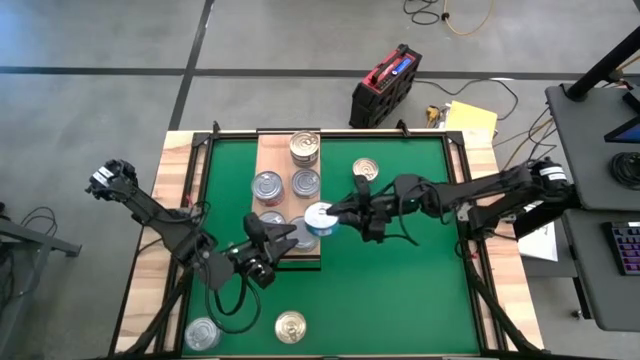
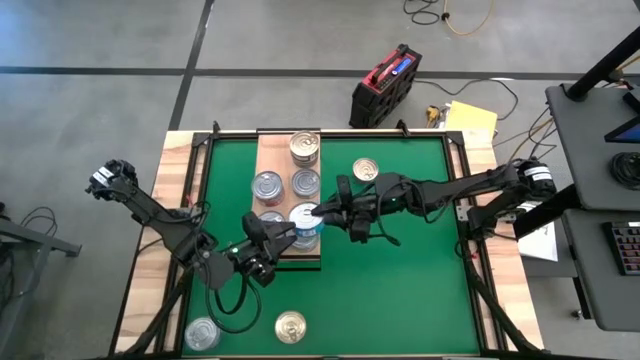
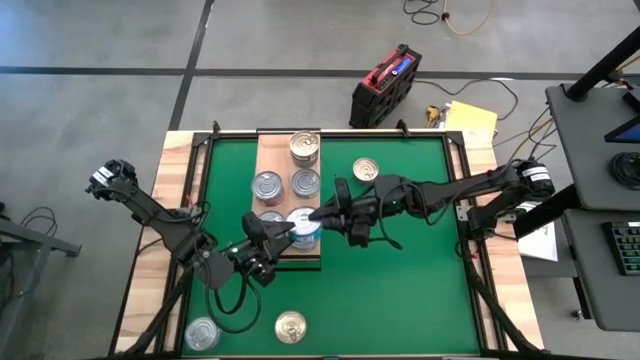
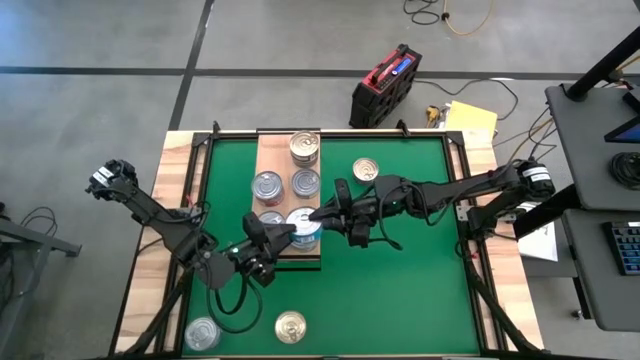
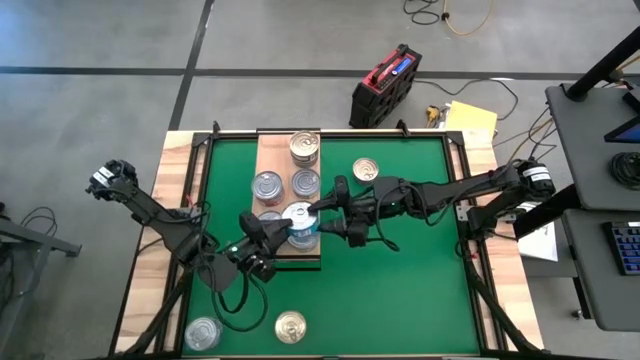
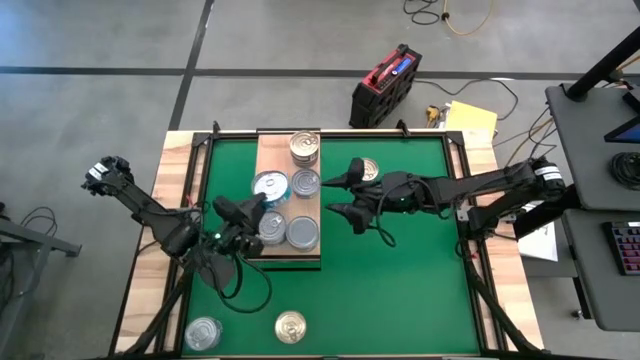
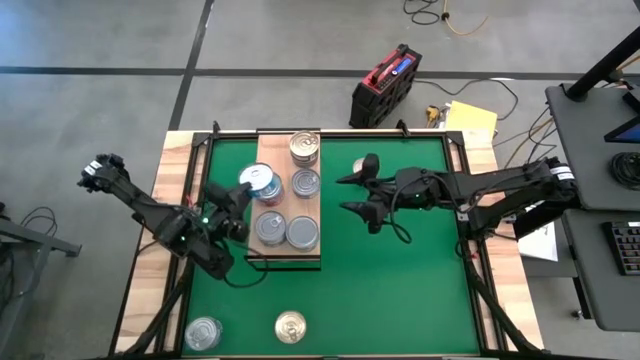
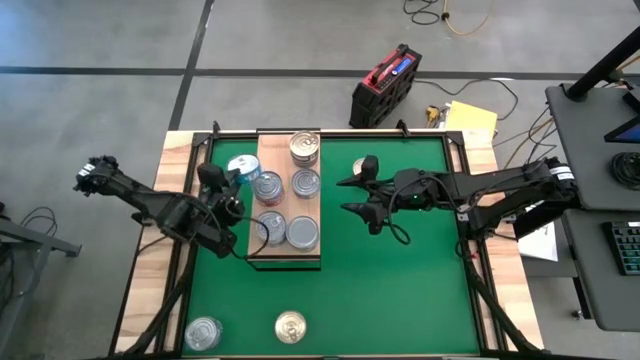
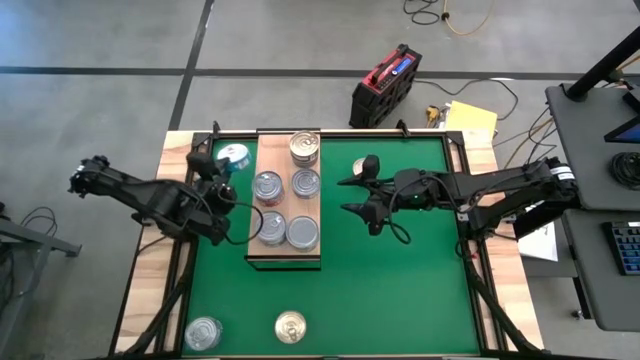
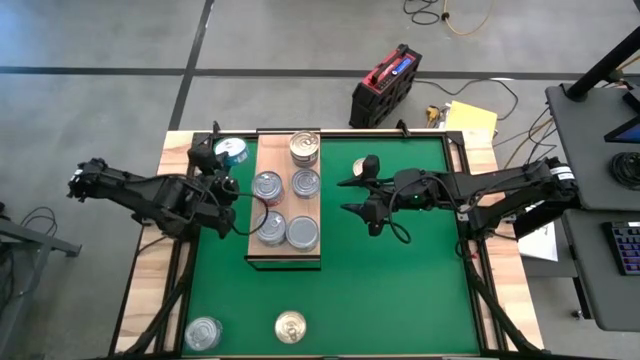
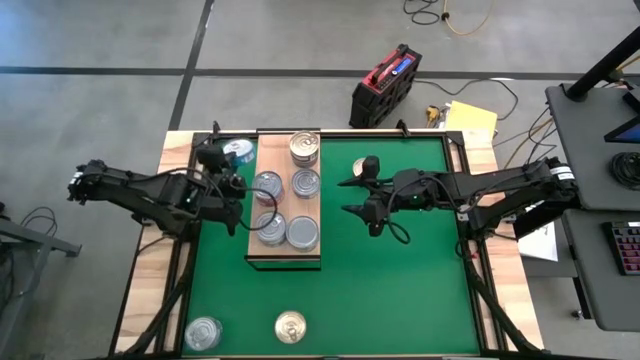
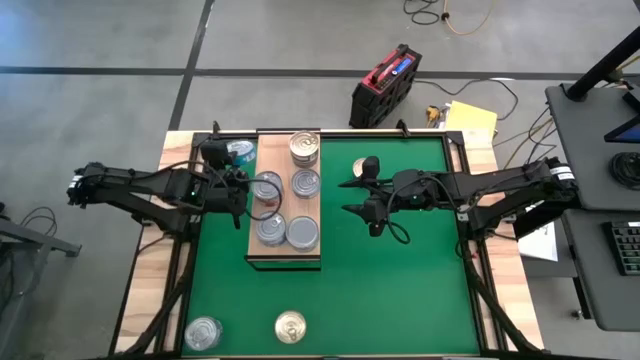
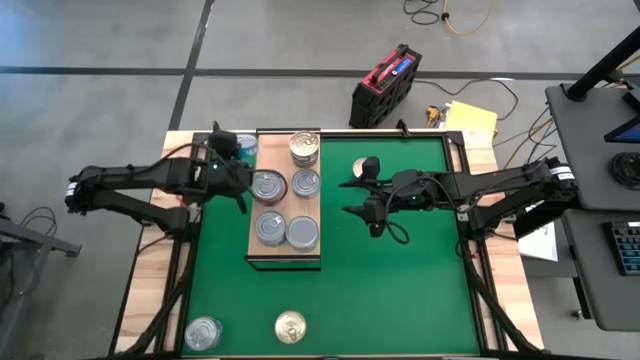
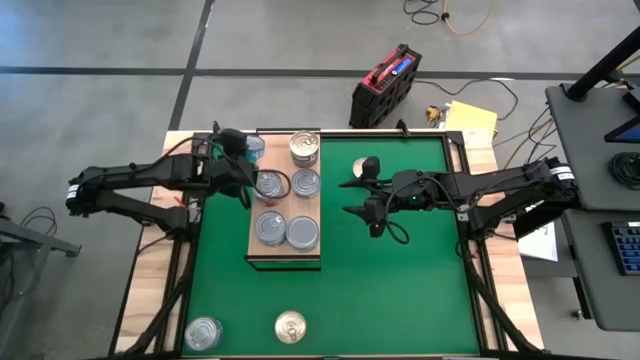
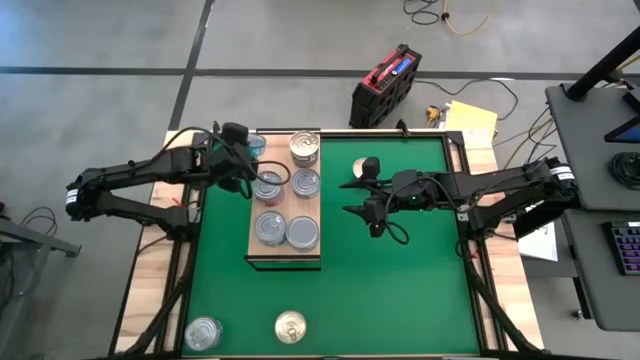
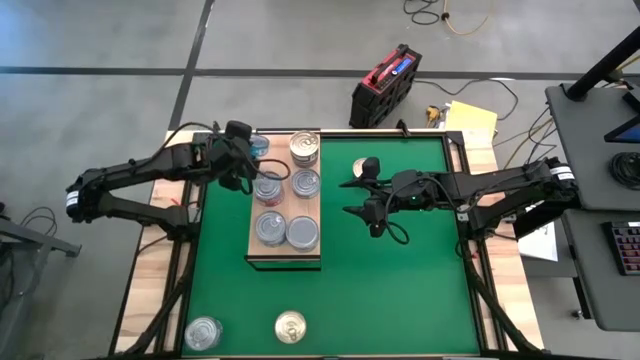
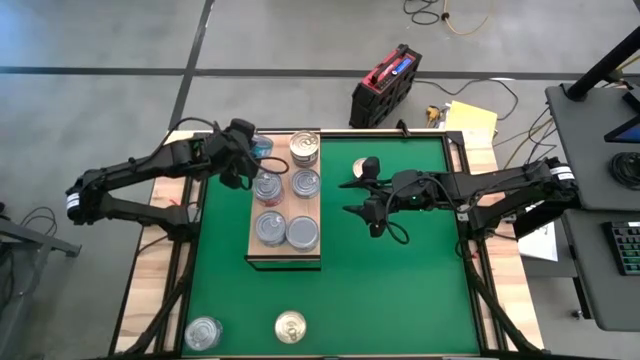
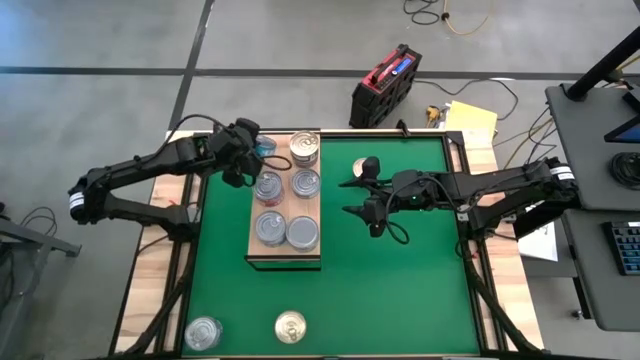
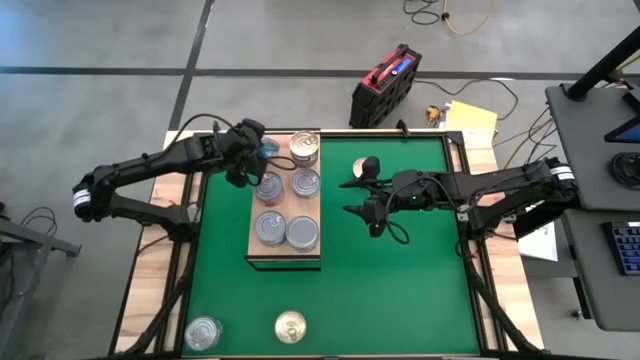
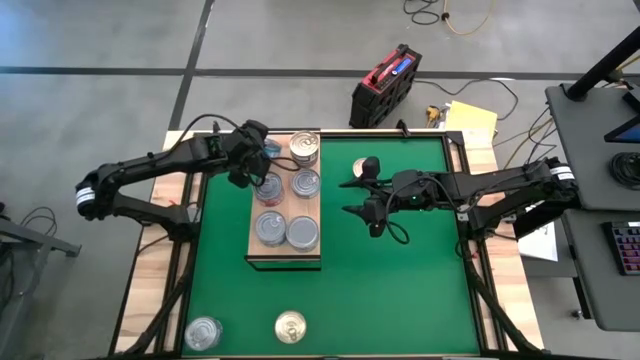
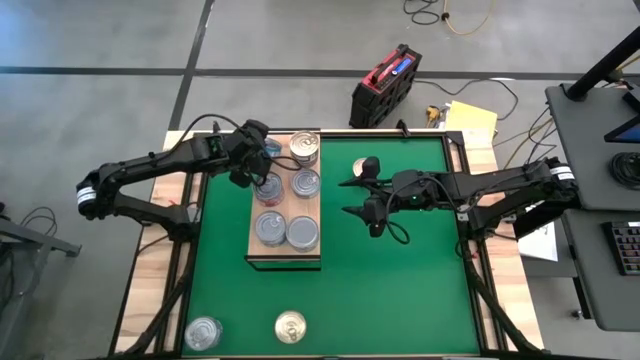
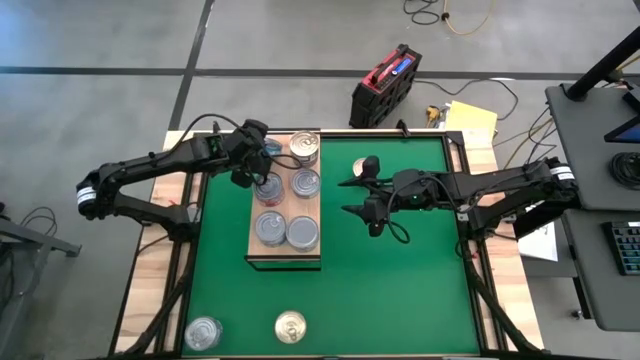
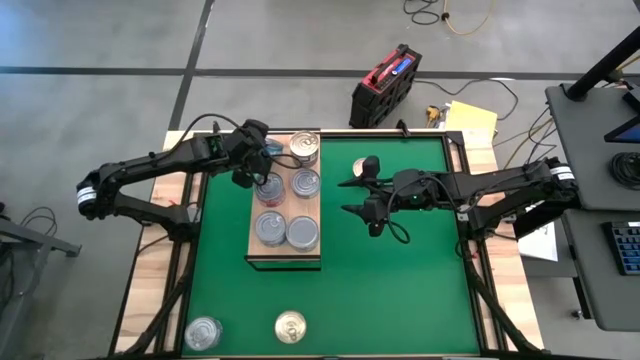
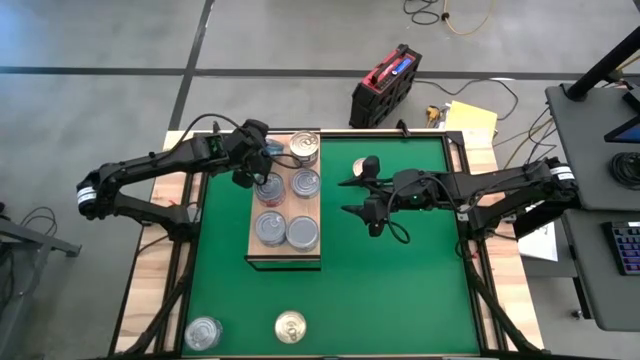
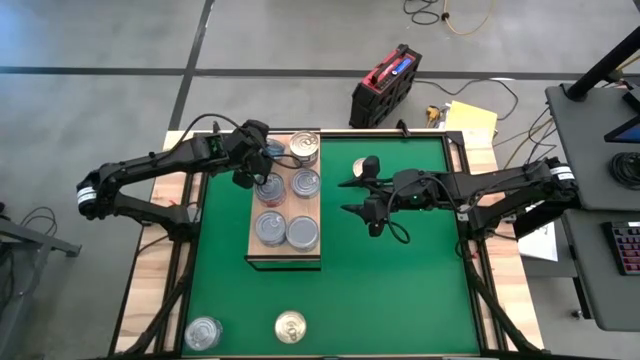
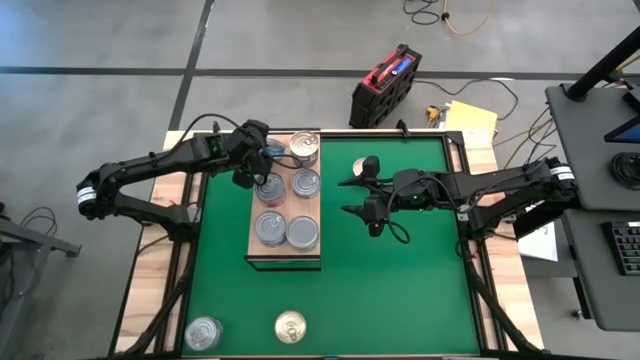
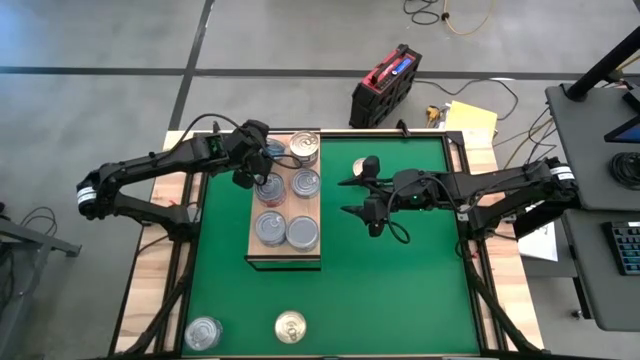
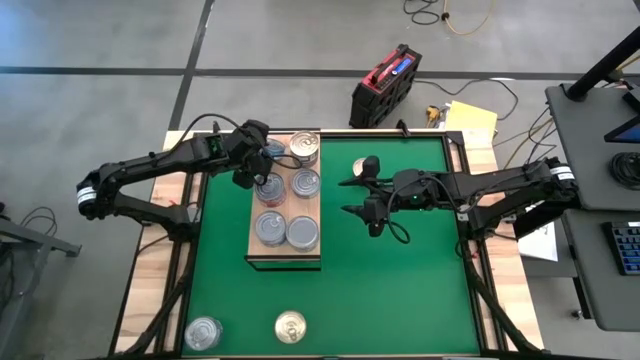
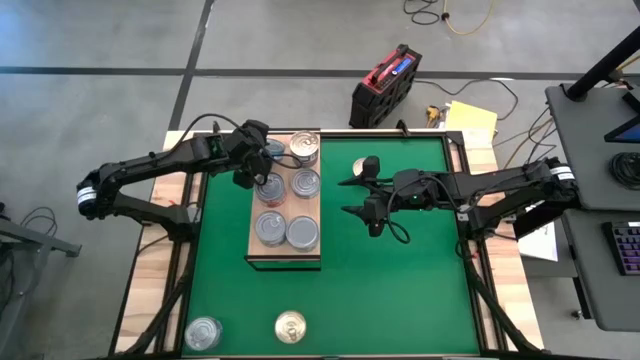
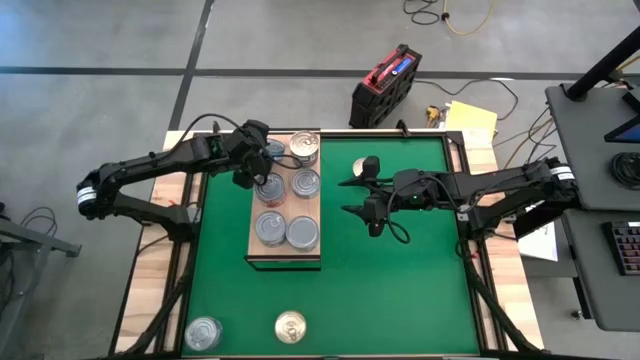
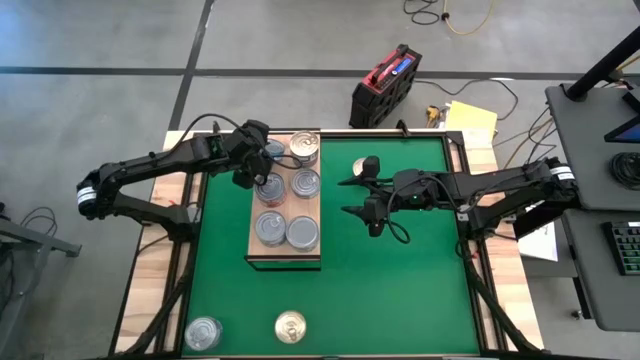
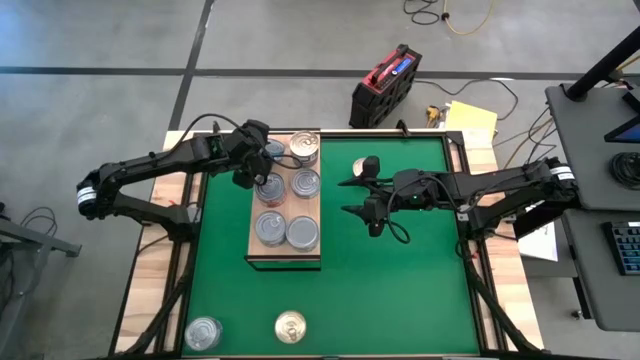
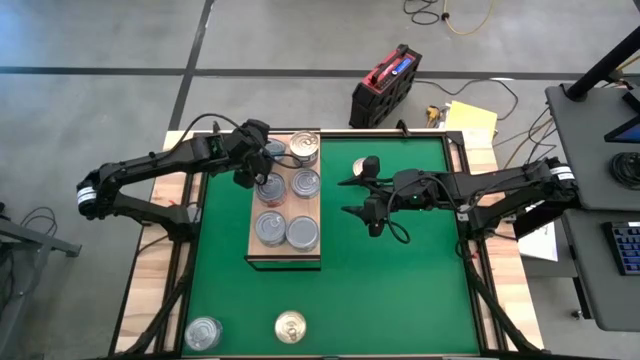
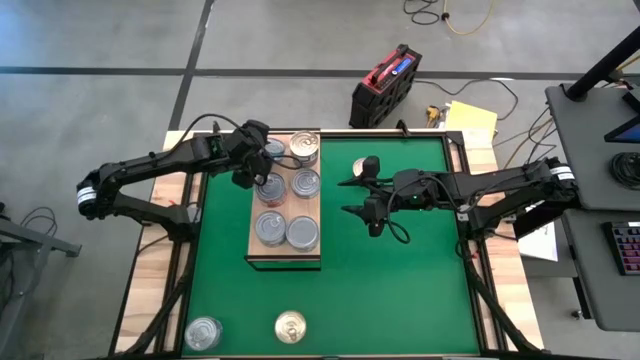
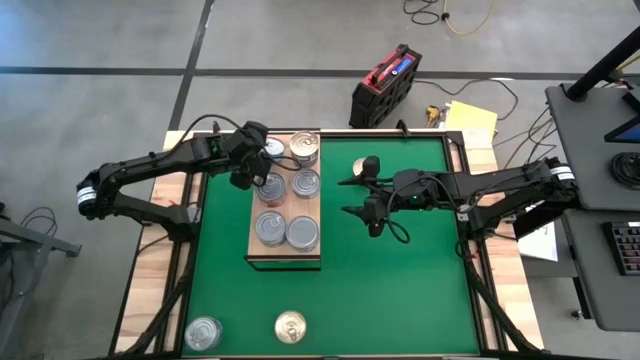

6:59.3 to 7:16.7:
Task: Stack canned seafood by type on shelf
Put the yellow and blue tuna can on the shelf

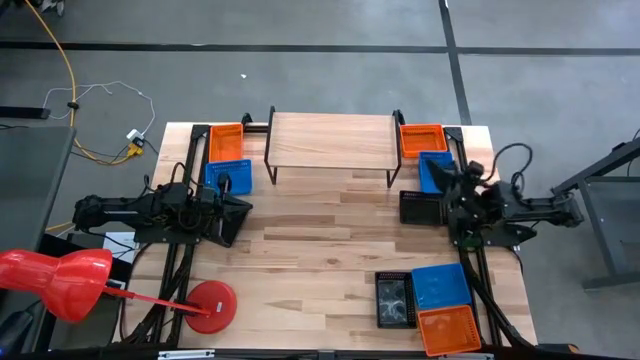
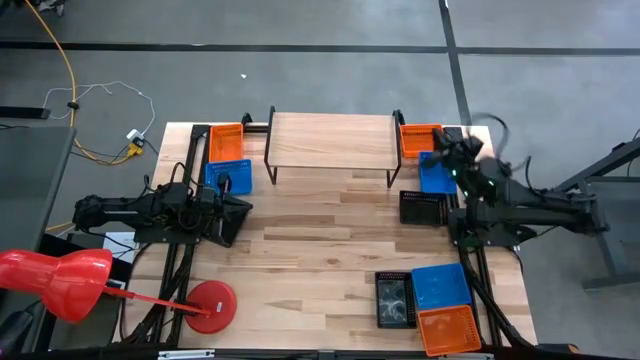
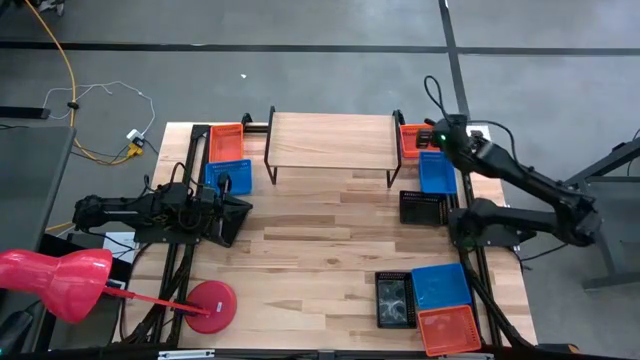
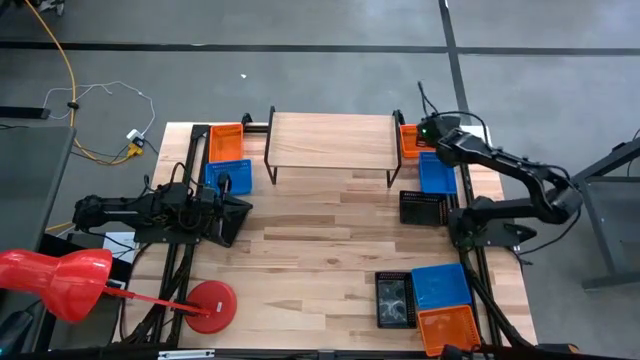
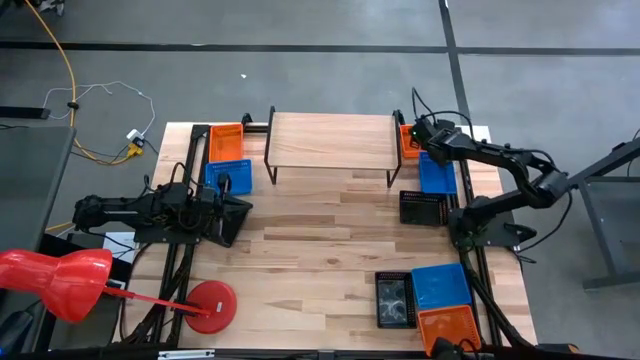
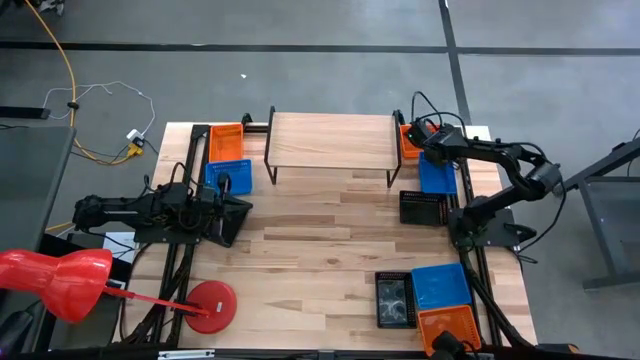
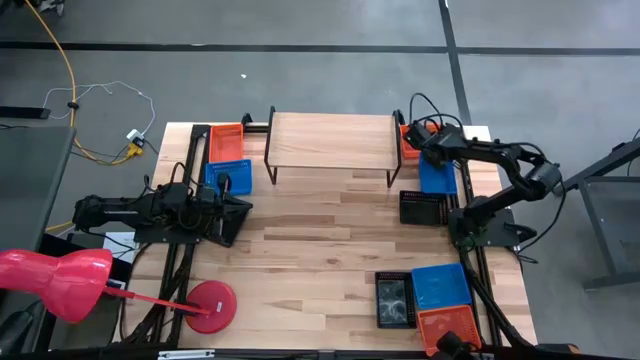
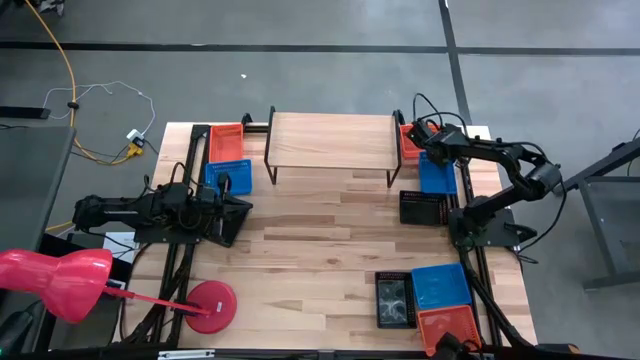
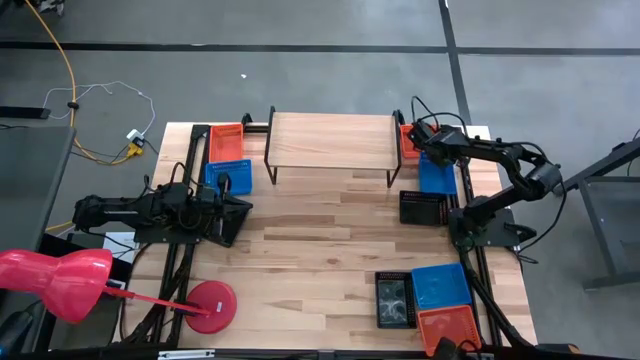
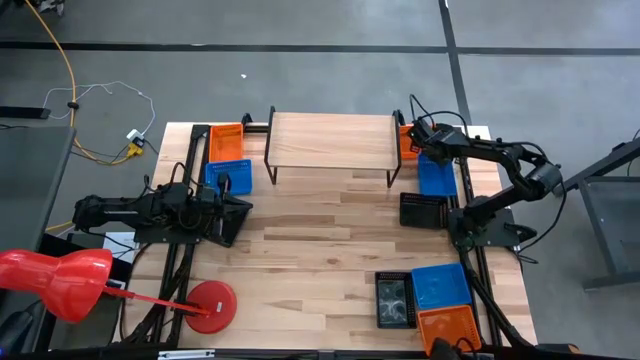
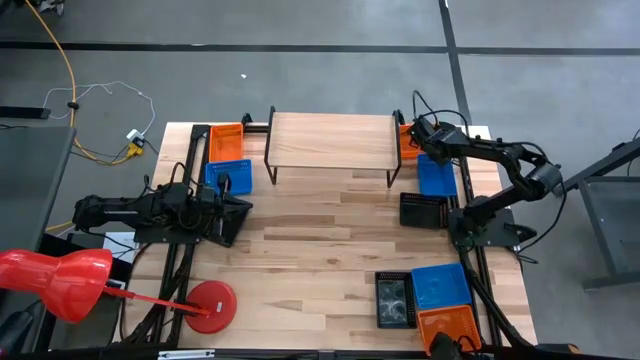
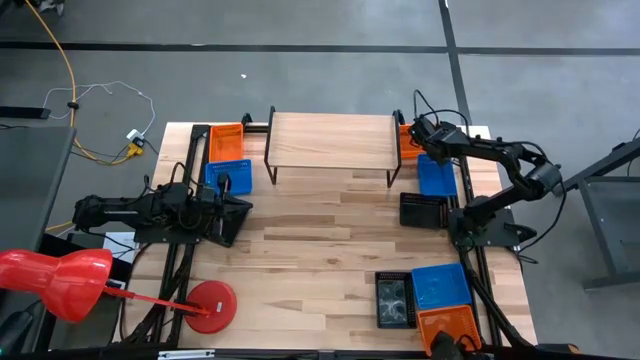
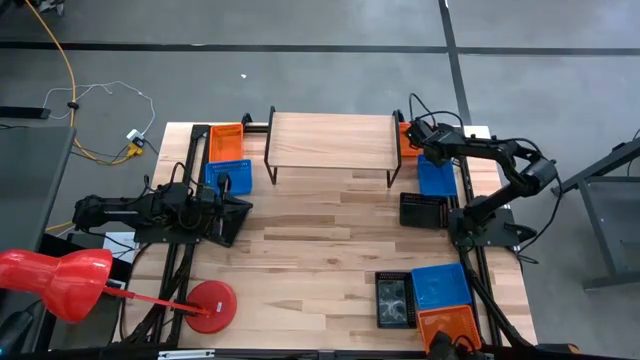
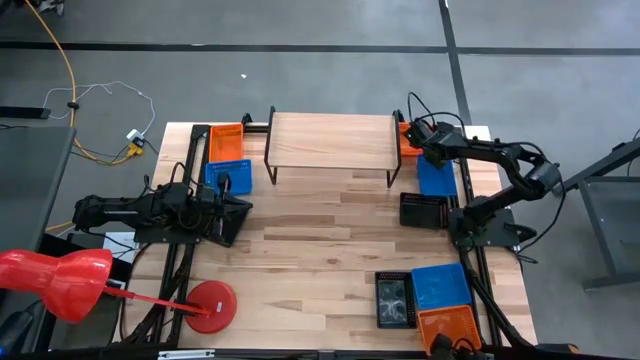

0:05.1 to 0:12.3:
Task: Stack baskets on shelf by color
Put the top right orange basket on the shelf
